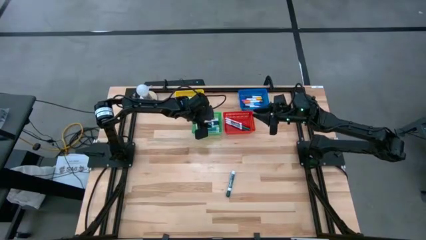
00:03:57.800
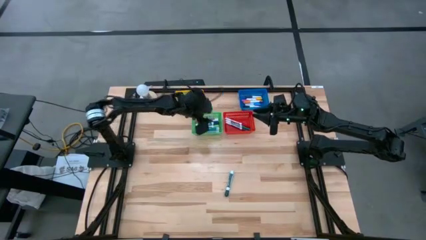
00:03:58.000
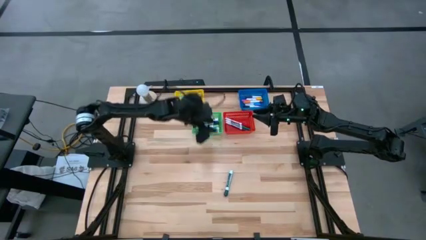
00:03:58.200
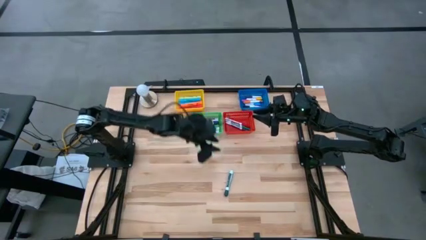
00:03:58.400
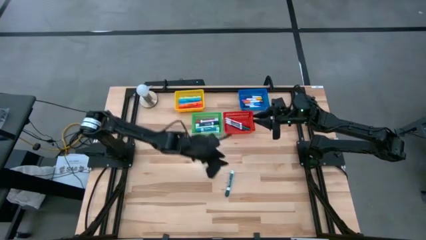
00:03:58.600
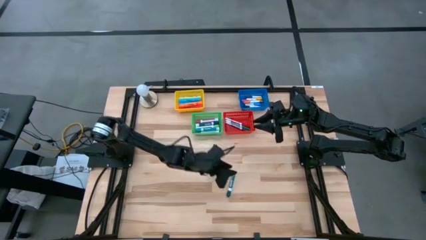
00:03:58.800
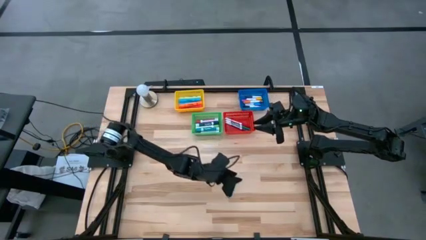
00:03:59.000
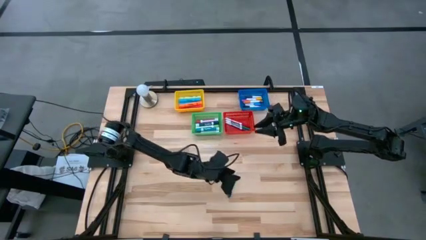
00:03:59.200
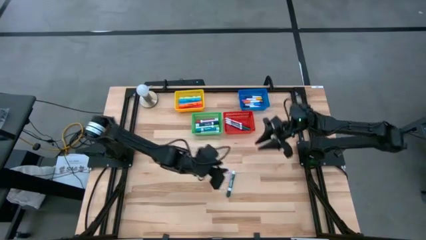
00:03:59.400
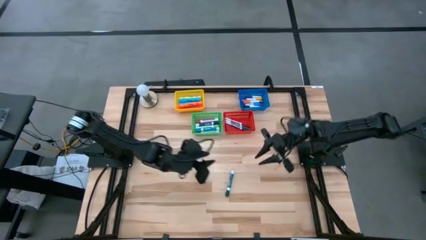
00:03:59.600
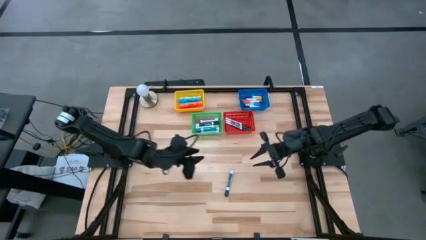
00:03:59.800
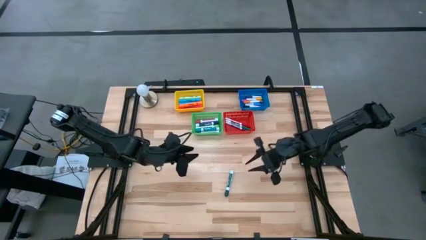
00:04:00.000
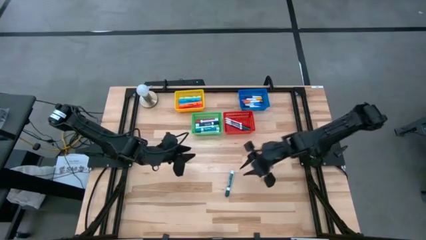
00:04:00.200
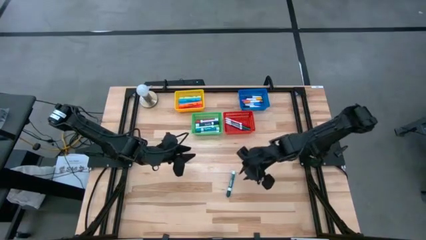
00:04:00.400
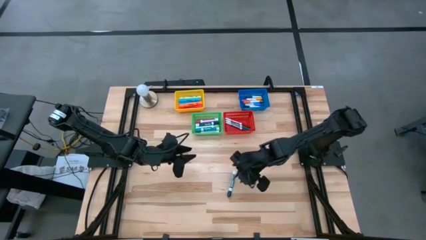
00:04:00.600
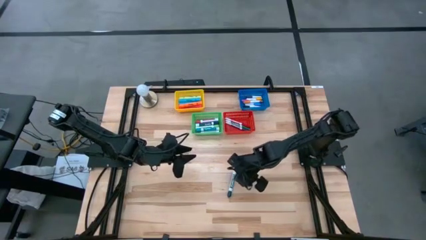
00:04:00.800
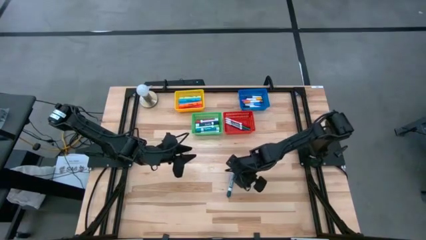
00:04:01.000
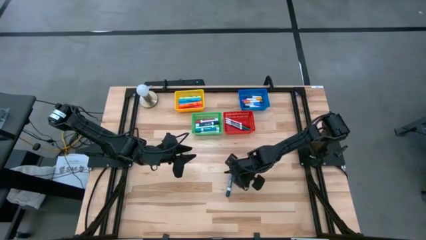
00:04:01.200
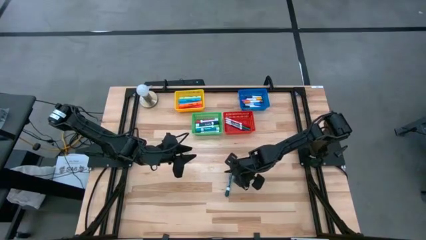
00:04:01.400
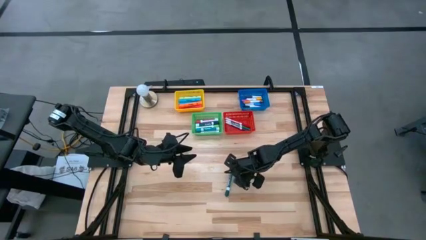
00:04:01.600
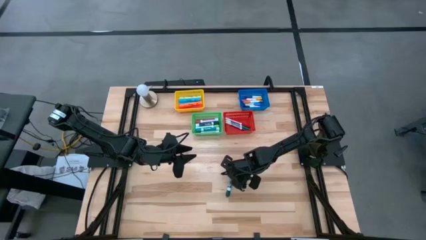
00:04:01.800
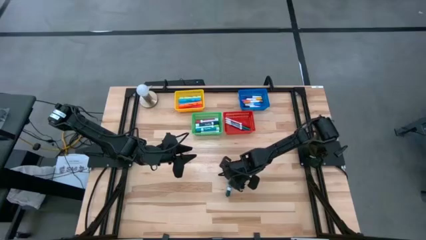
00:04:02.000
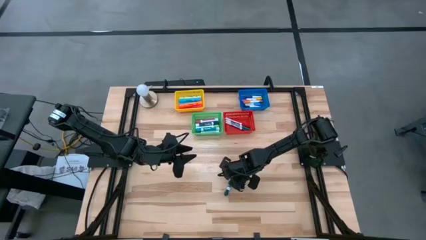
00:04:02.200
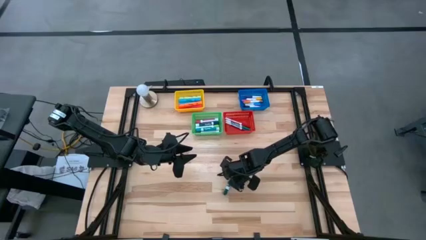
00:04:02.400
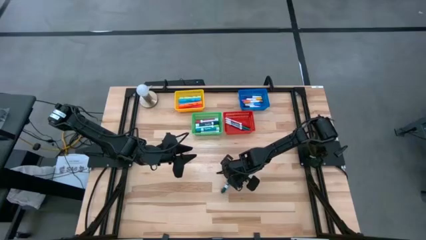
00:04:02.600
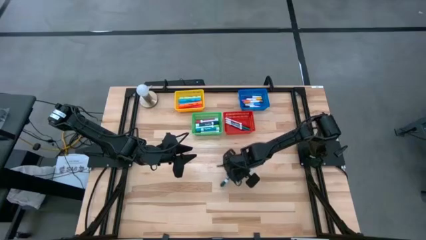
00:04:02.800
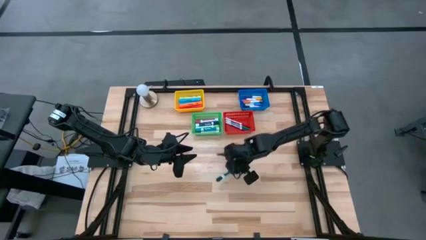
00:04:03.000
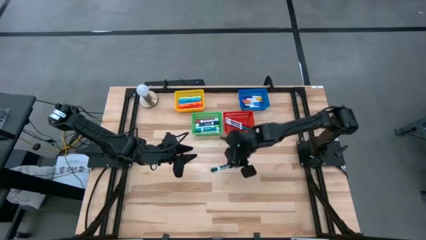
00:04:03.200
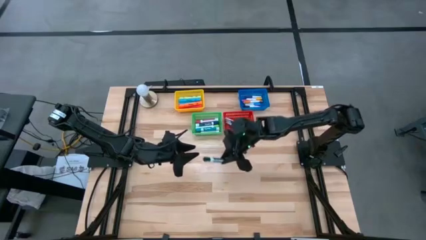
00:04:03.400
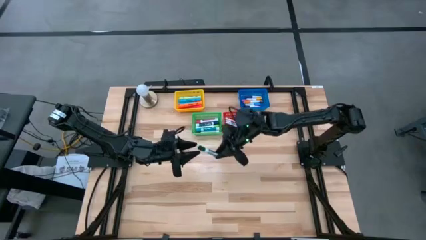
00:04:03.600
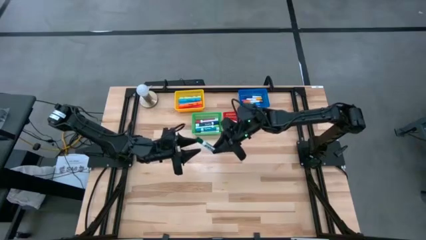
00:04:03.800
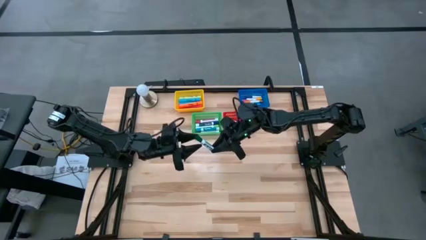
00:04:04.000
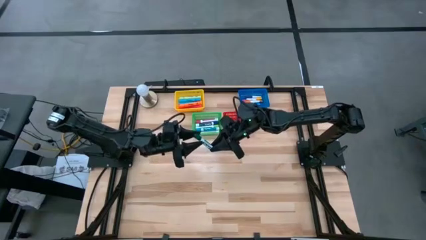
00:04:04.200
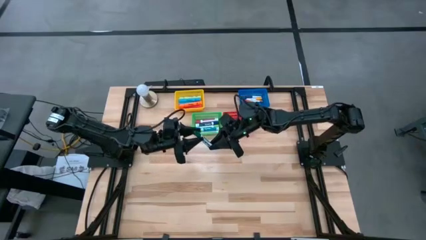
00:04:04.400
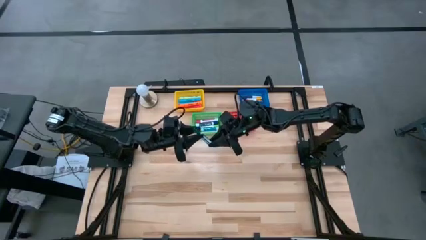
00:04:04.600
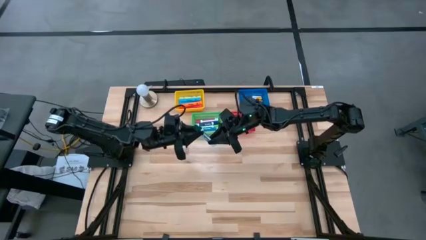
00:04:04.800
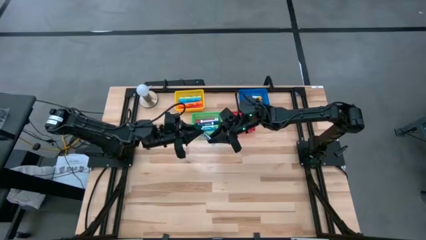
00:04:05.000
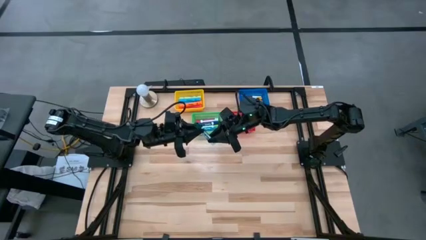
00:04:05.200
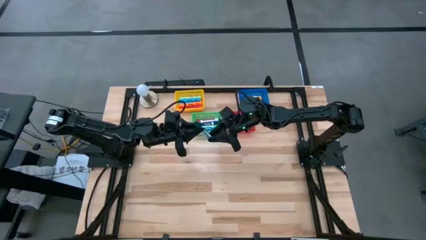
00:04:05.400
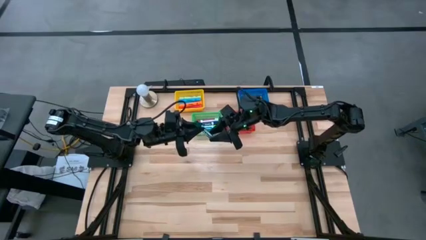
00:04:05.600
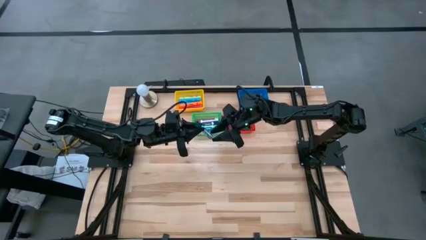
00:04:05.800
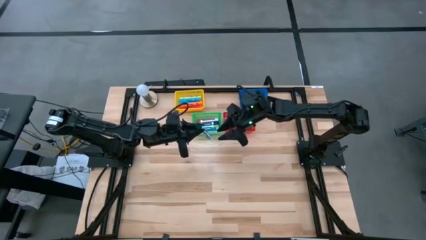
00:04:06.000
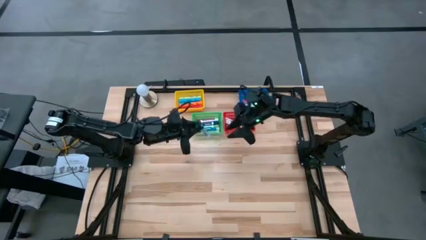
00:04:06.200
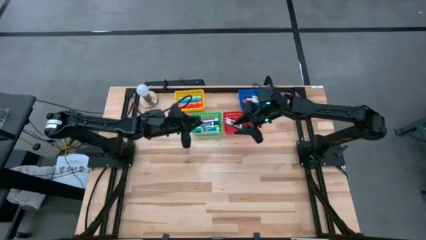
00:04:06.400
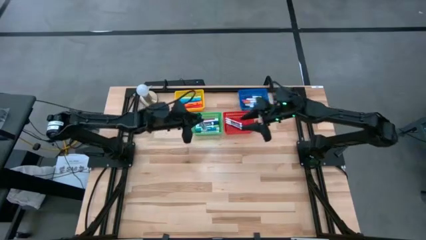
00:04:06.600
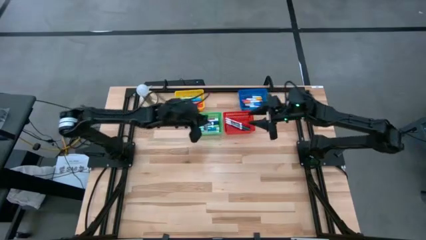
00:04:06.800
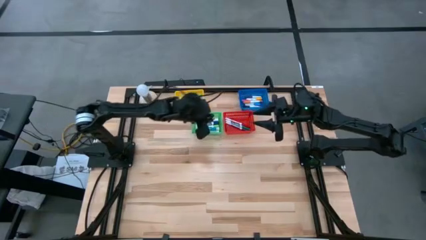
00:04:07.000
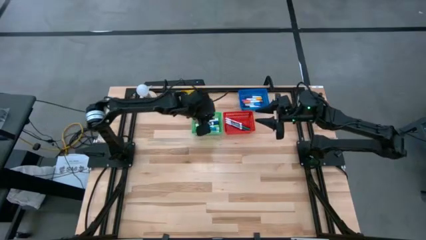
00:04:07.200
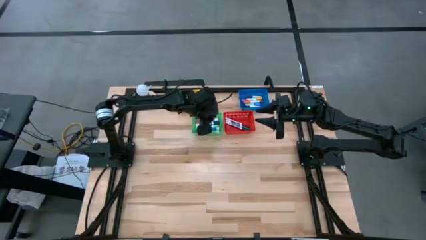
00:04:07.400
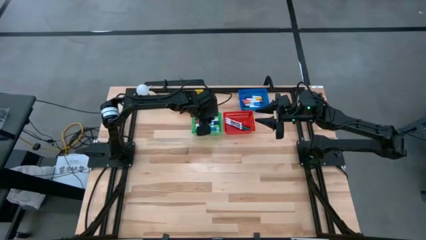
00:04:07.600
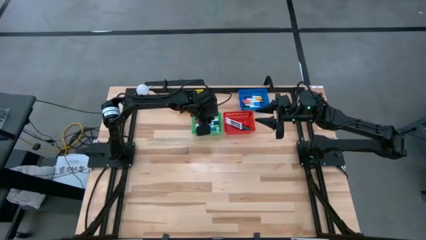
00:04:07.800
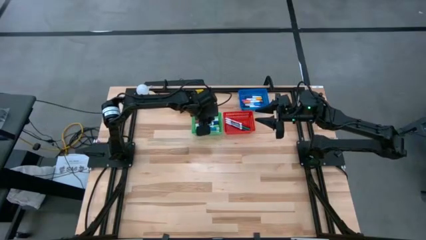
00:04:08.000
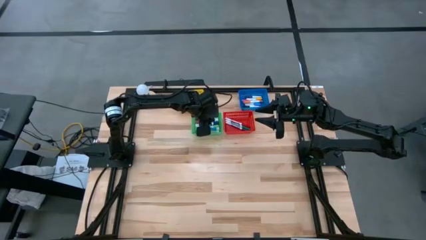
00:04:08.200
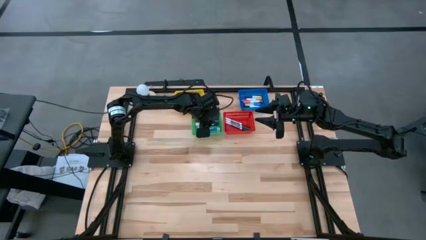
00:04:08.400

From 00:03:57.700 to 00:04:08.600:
Task: Pick & Place Markers
Put the dark green marker into the green bin

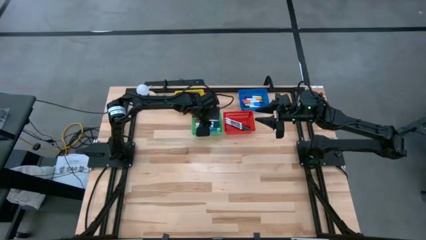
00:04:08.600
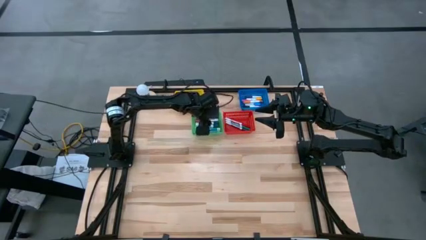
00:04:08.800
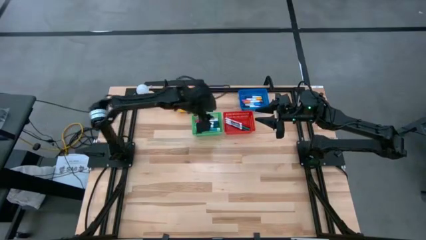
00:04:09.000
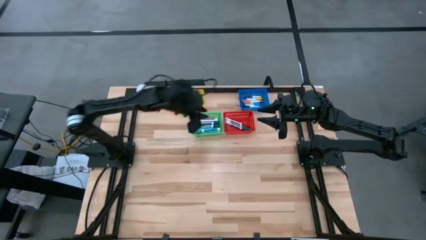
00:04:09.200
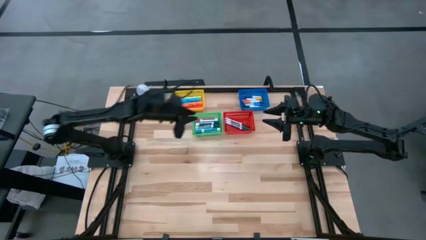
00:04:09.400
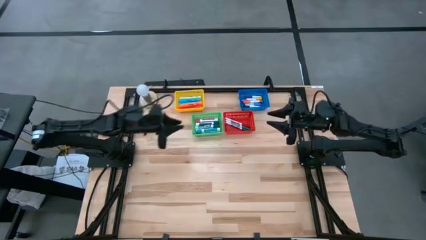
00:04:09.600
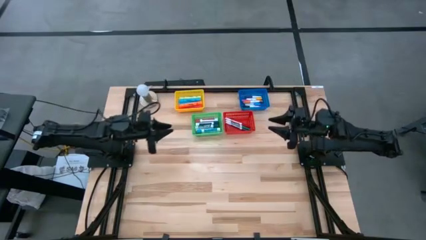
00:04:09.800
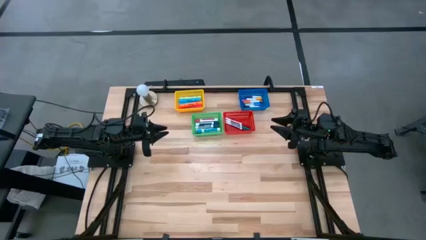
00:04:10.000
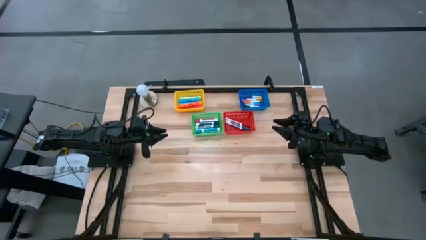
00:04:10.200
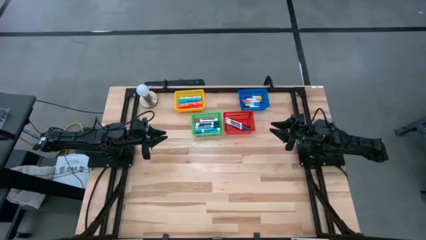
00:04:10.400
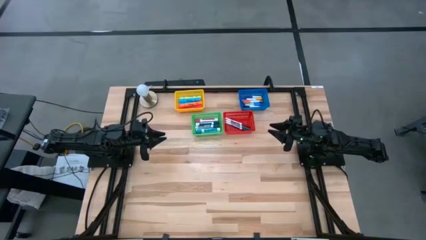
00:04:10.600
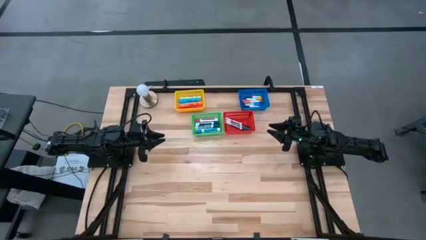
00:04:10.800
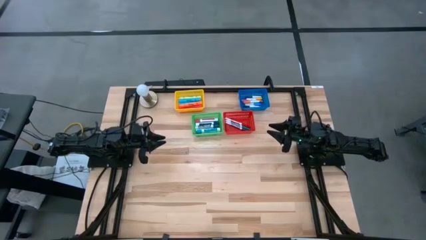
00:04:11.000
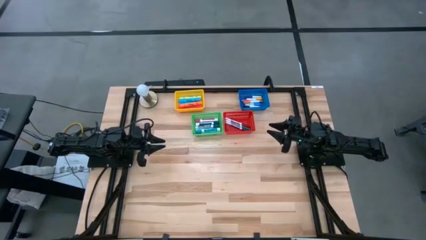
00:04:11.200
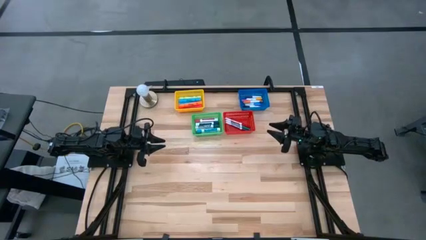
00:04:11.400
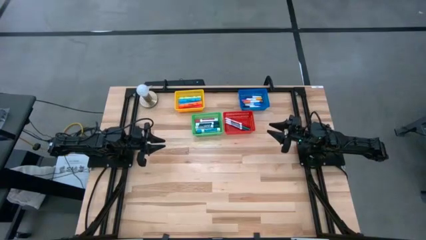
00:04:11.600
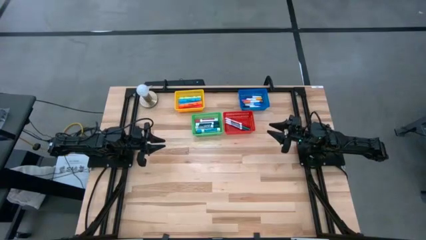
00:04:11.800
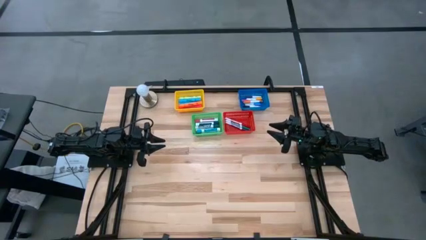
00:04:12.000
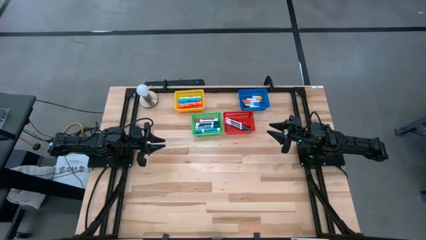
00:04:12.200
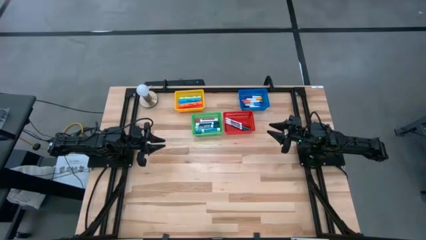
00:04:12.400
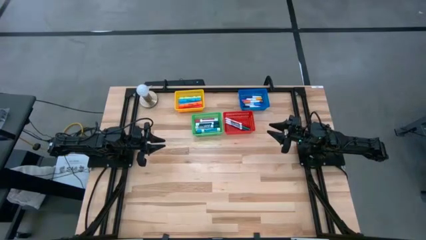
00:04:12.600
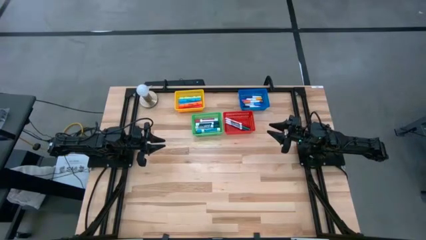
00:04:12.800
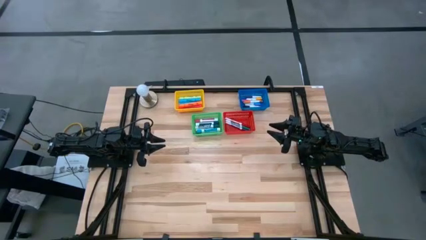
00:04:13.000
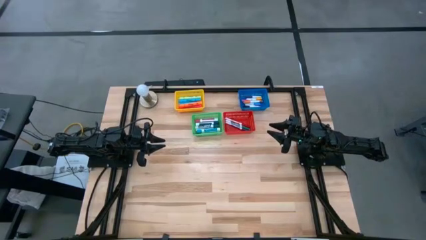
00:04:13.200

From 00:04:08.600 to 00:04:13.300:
Return to Home Position
